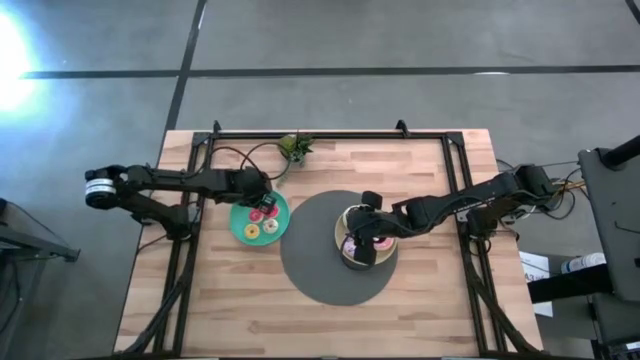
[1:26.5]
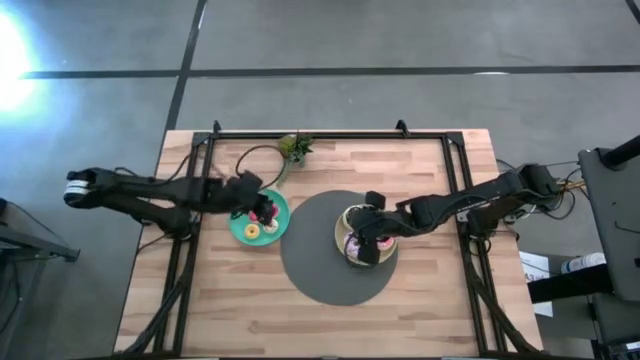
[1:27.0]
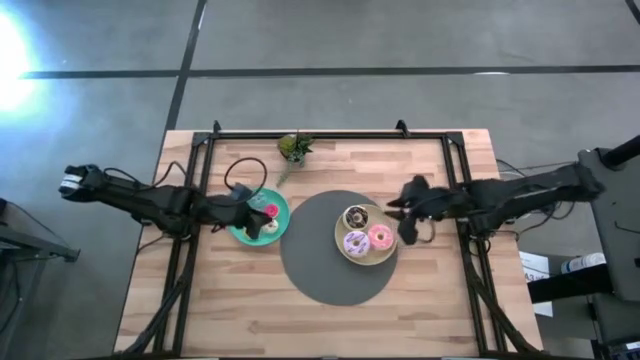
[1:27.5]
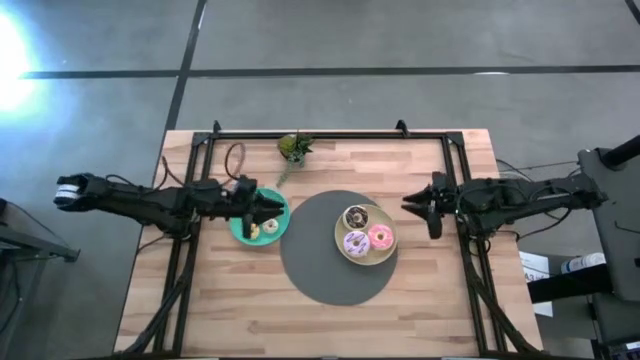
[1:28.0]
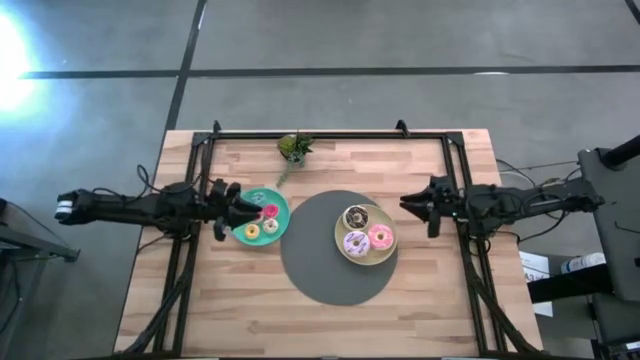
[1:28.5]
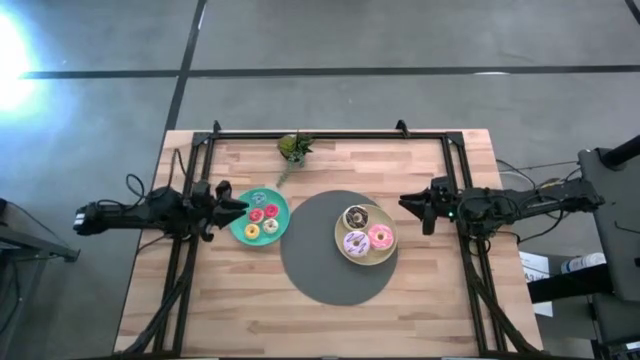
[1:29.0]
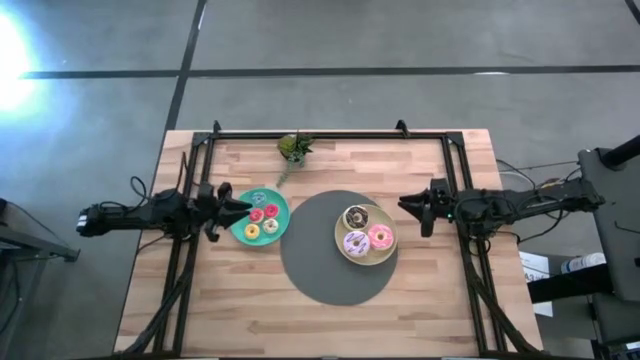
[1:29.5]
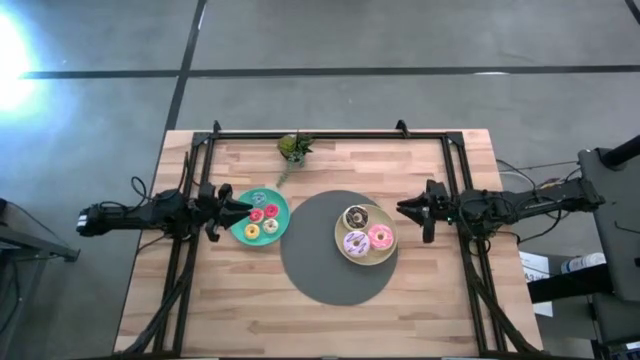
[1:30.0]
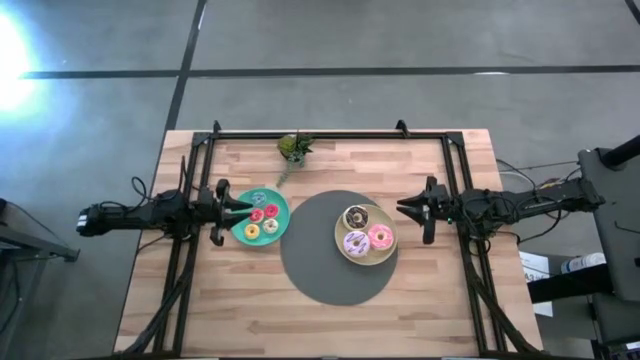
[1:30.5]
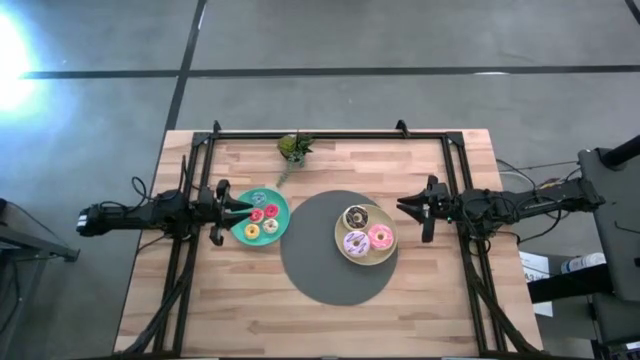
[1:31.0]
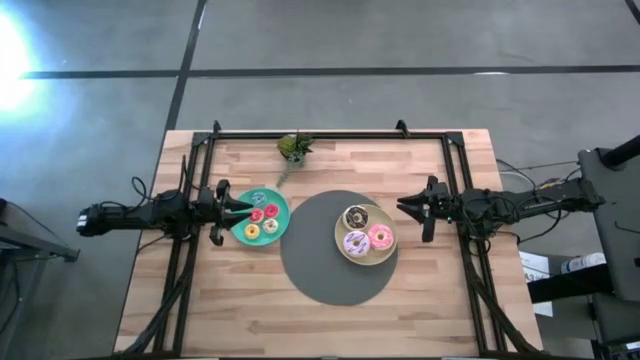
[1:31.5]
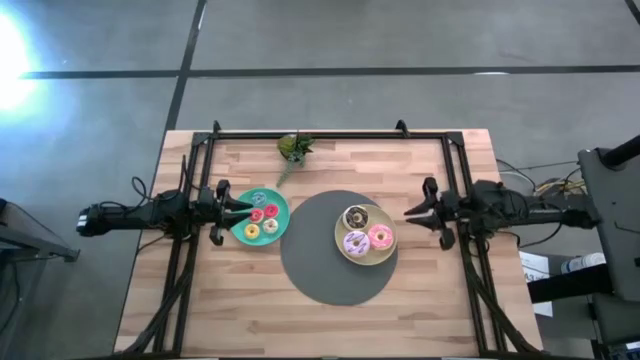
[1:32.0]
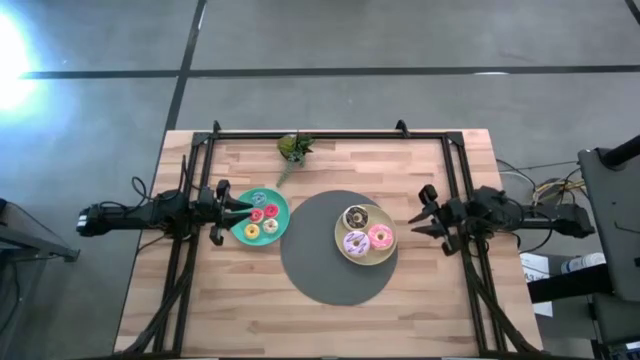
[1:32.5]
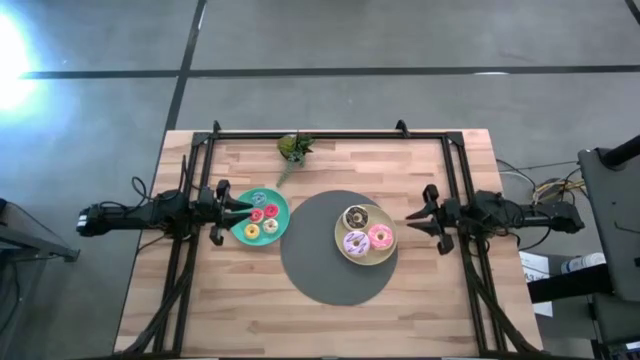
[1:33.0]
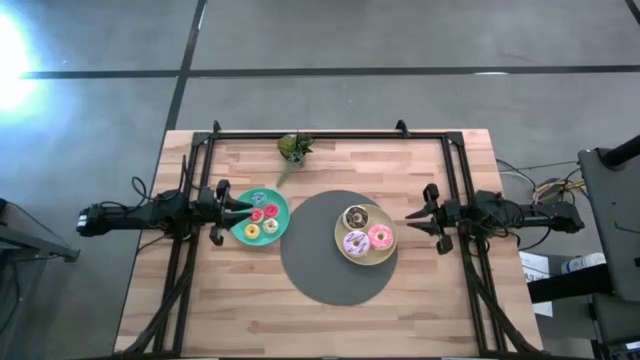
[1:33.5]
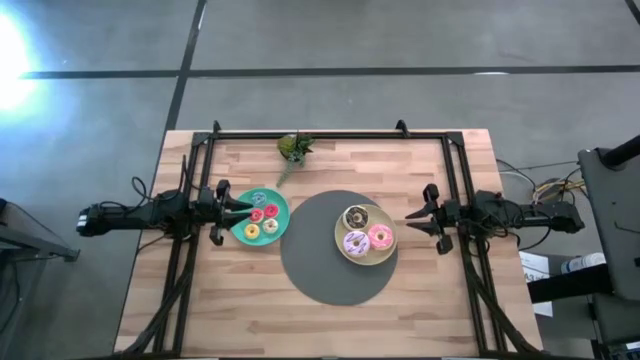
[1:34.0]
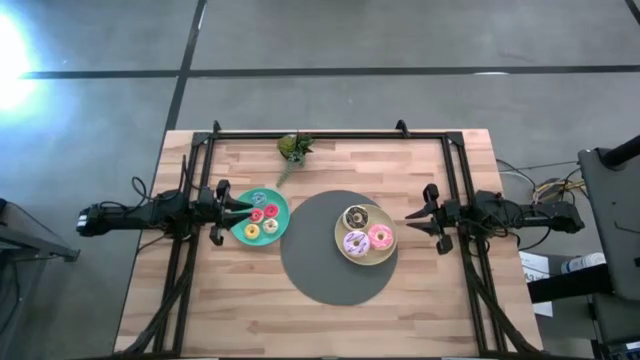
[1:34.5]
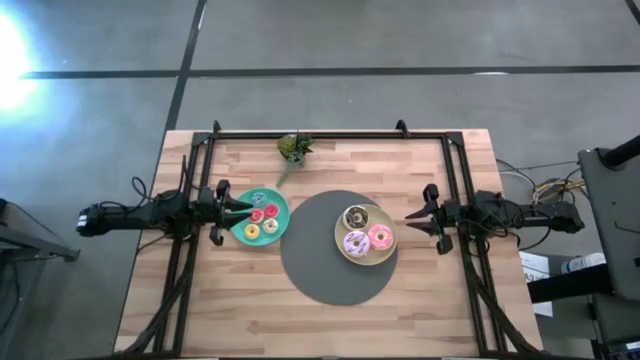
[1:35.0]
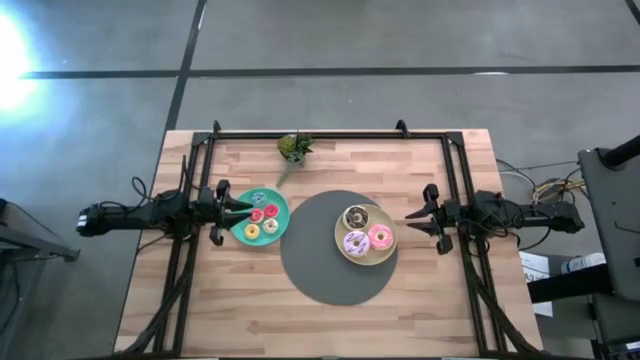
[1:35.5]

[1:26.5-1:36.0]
Task: Pick & Place donuts
Return to Home Position

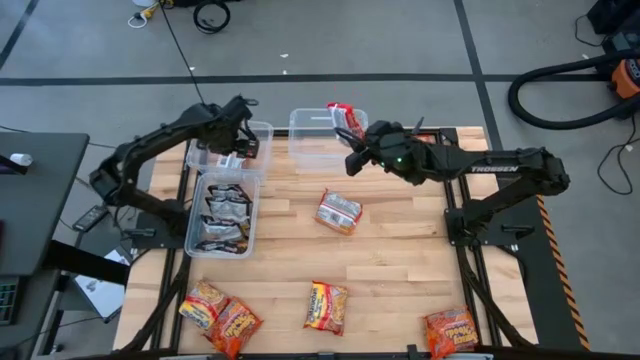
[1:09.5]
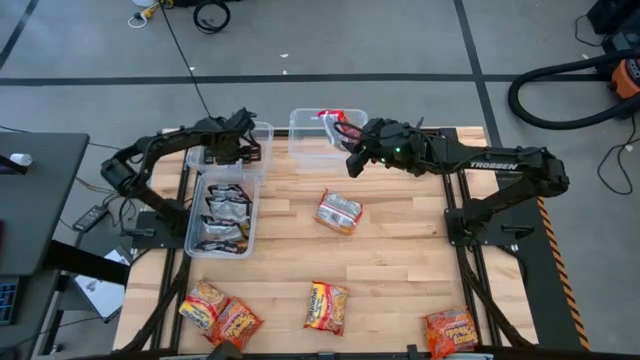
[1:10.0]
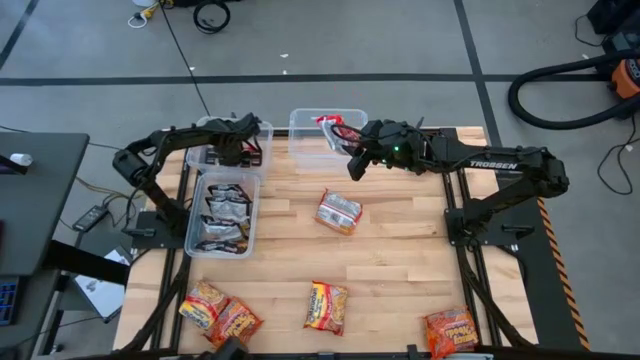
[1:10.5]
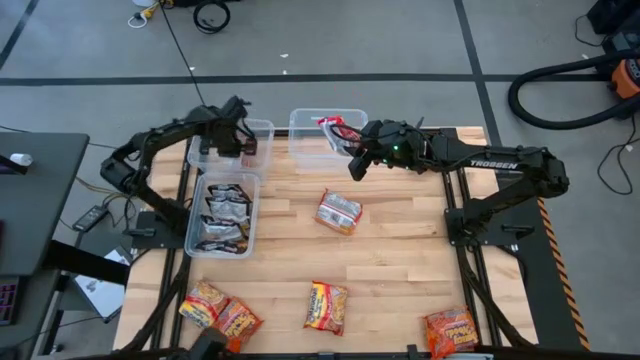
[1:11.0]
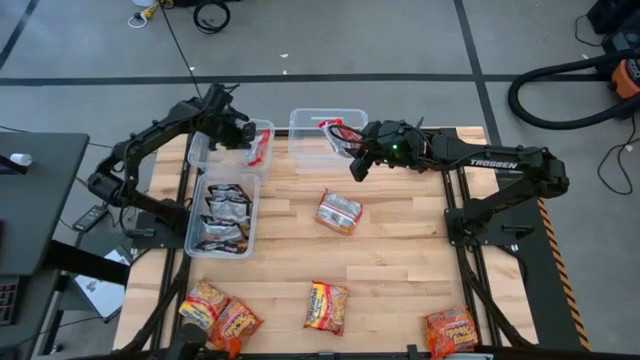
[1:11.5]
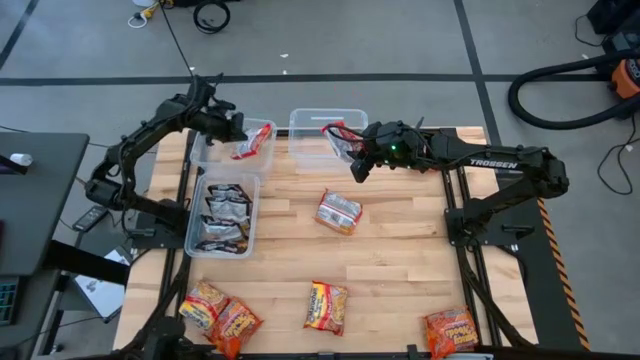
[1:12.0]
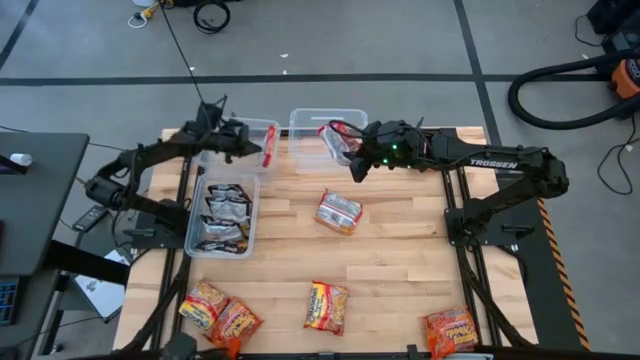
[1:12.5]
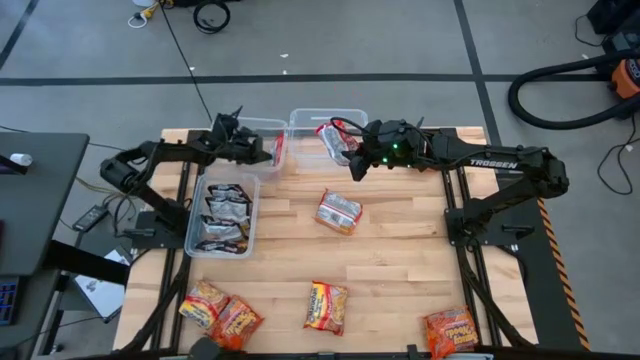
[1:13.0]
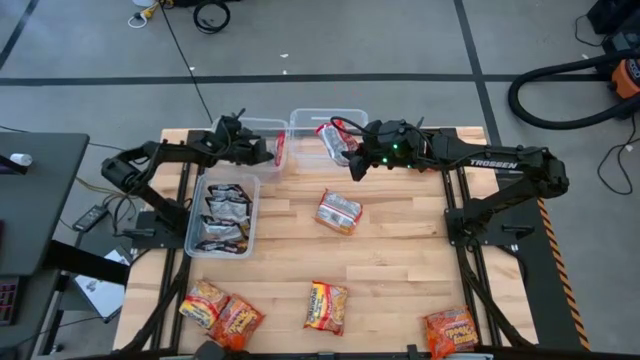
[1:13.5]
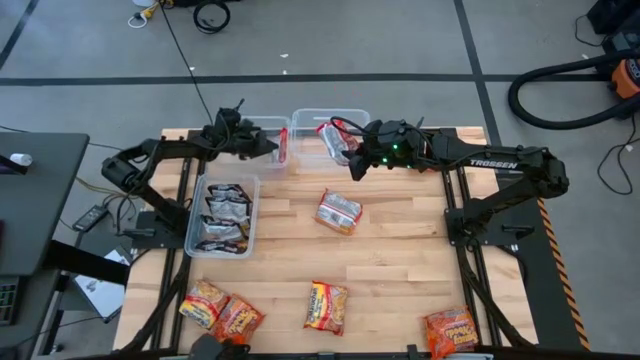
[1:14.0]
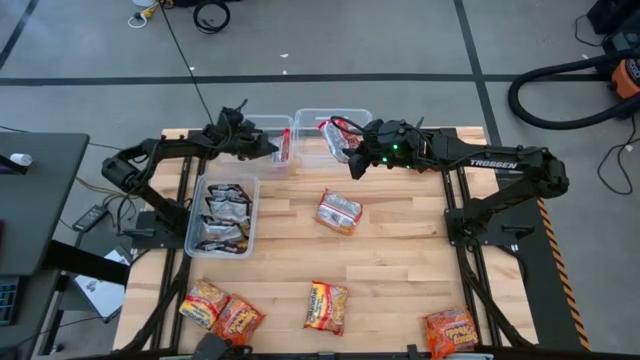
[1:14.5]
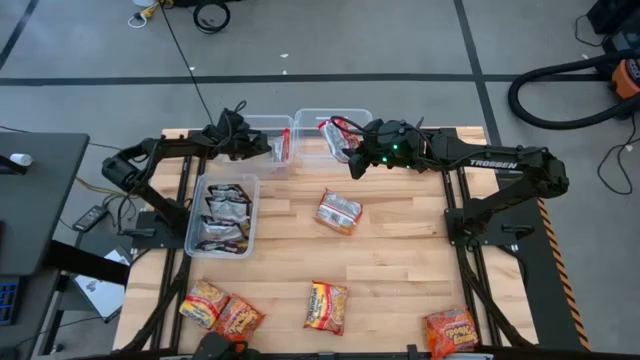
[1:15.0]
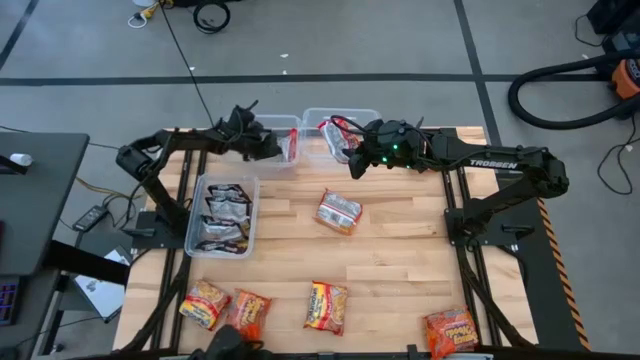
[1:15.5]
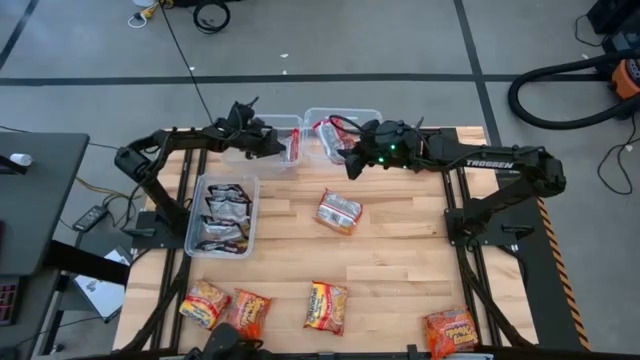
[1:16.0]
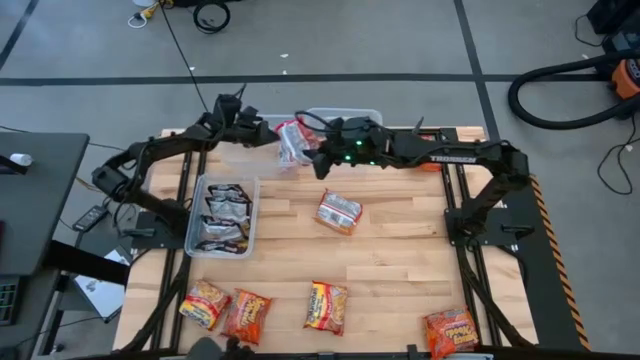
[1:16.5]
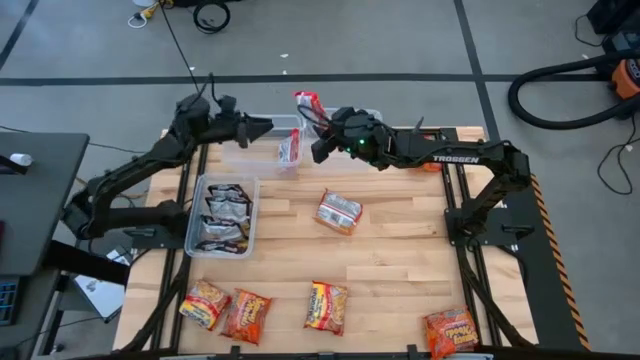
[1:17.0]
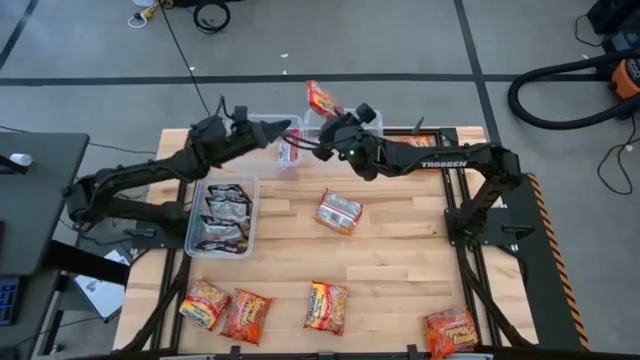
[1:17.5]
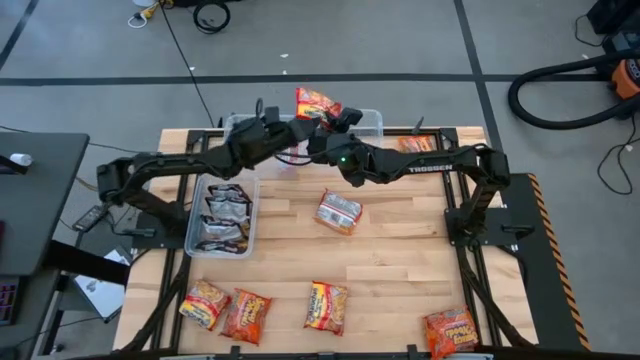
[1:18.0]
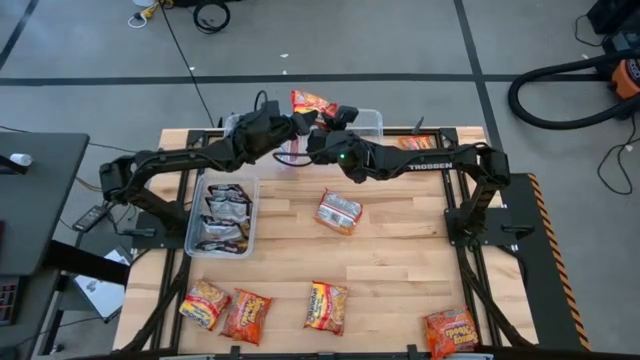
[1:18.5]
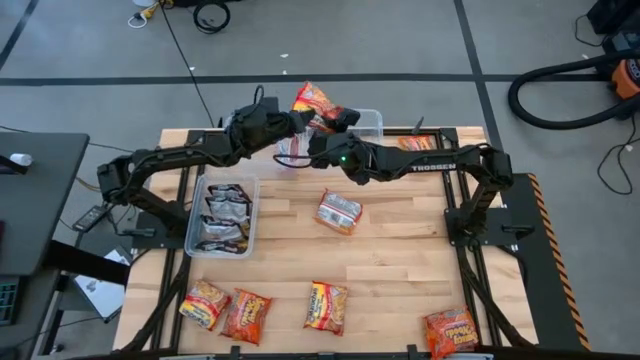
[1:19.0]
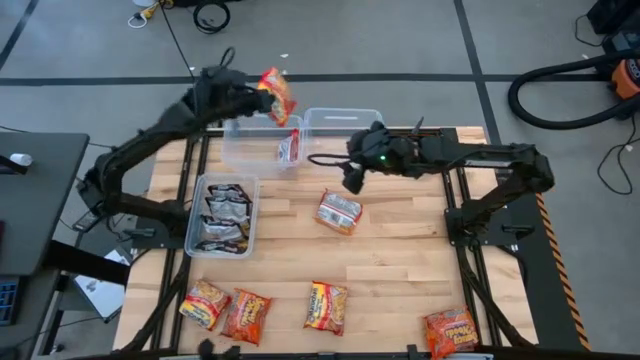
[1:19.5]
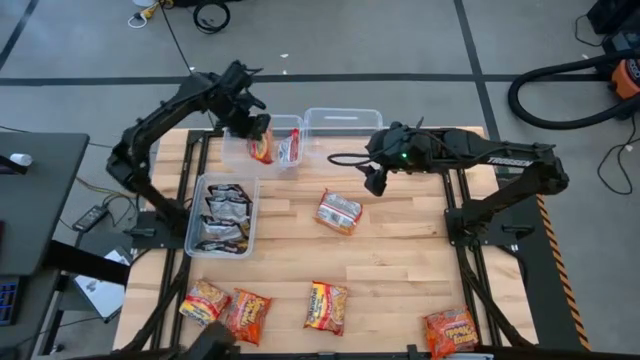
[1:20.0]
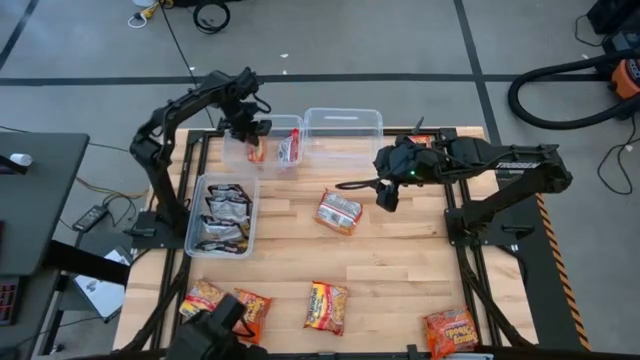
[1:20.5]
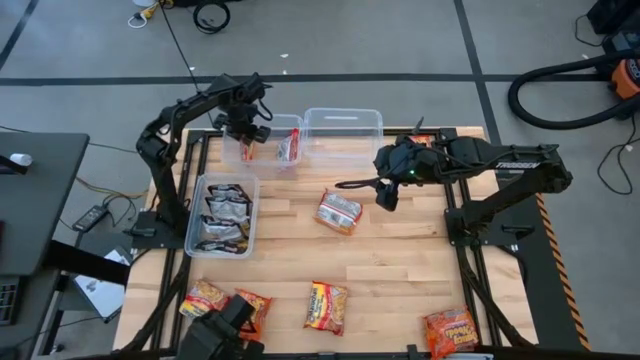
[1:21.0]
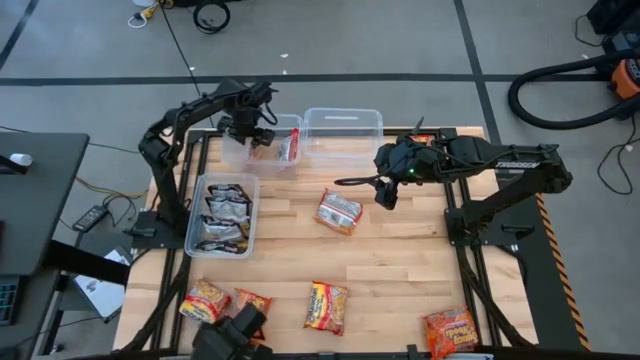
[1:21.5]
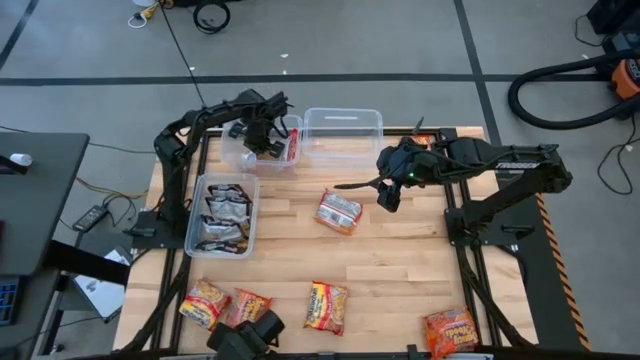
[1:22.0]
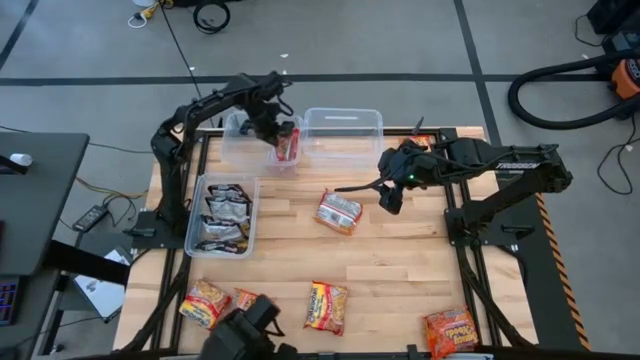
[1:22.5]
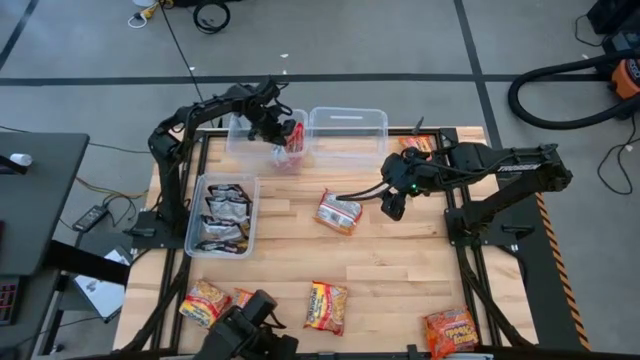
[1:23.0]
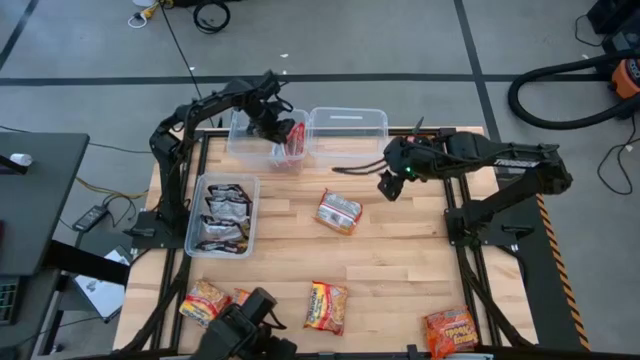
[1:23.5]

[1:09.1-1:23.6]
Task: Sort Maruchan noodles
Adjust the noodles pack from the bin
